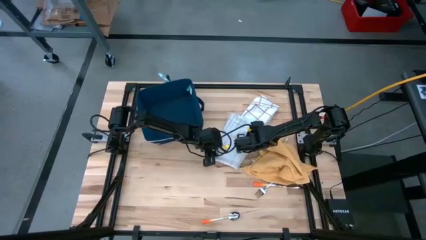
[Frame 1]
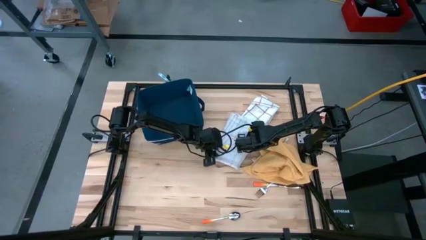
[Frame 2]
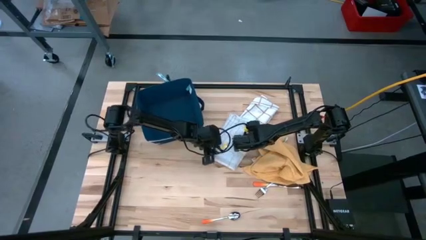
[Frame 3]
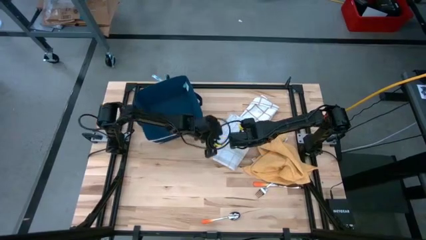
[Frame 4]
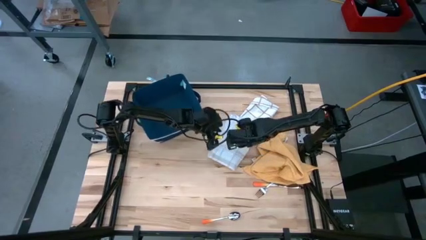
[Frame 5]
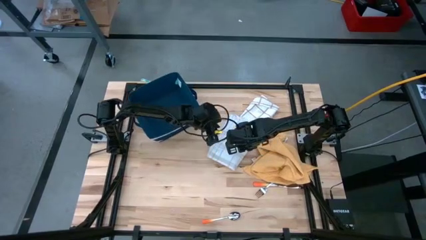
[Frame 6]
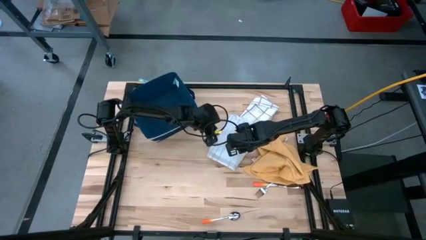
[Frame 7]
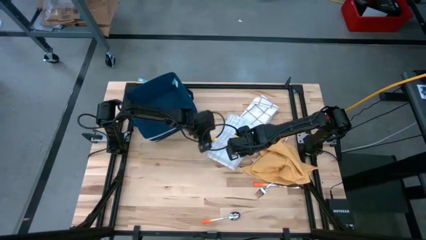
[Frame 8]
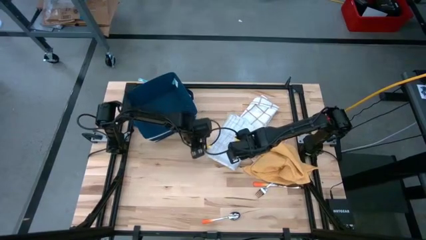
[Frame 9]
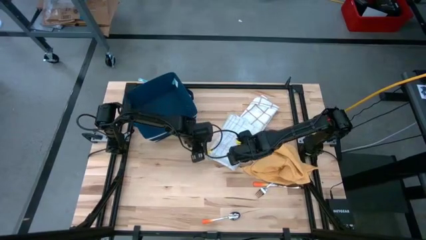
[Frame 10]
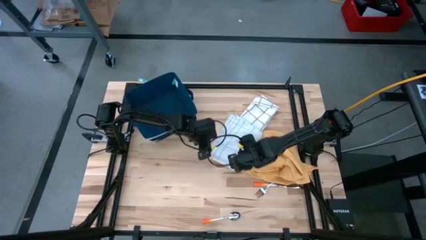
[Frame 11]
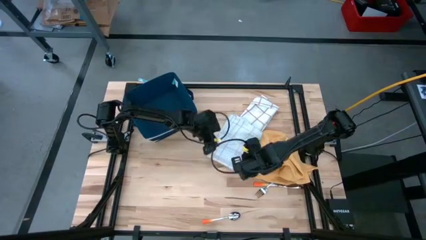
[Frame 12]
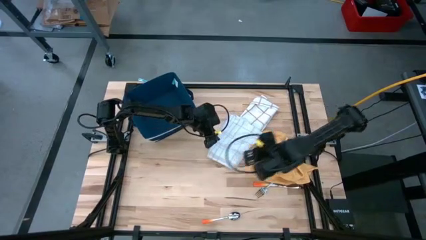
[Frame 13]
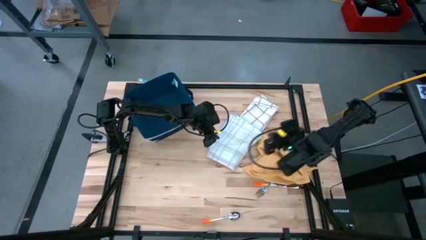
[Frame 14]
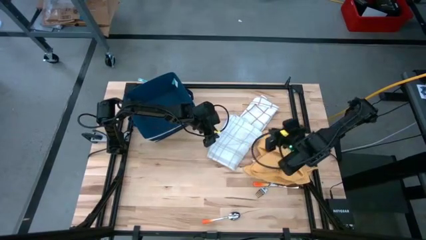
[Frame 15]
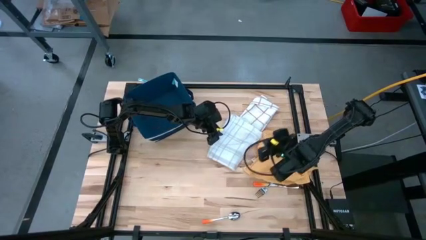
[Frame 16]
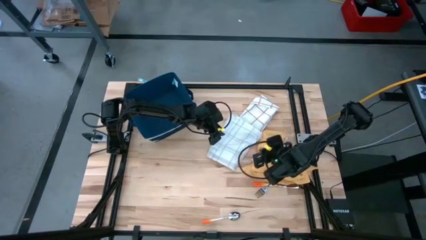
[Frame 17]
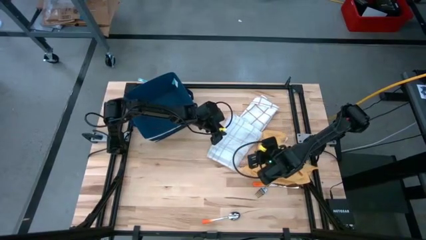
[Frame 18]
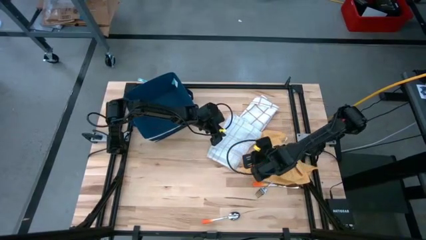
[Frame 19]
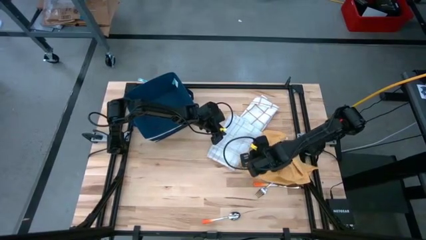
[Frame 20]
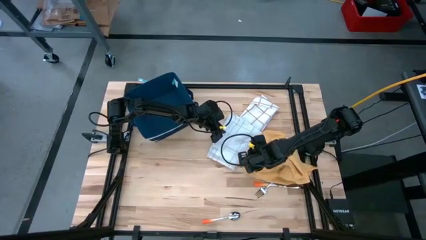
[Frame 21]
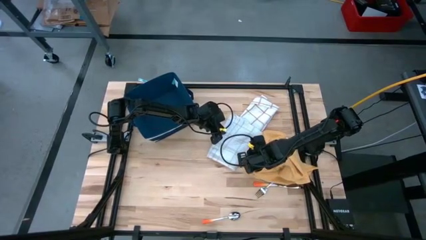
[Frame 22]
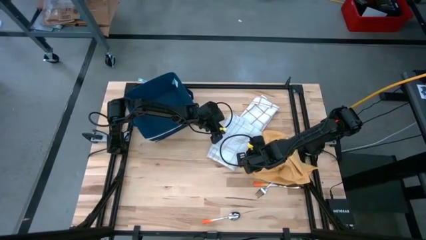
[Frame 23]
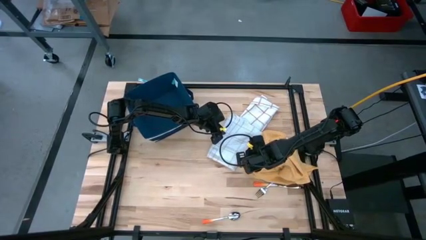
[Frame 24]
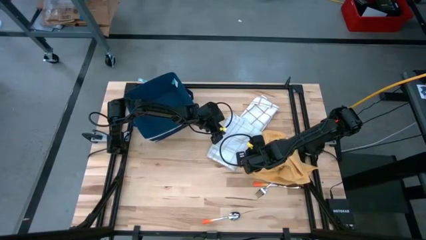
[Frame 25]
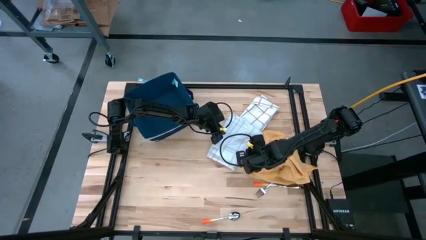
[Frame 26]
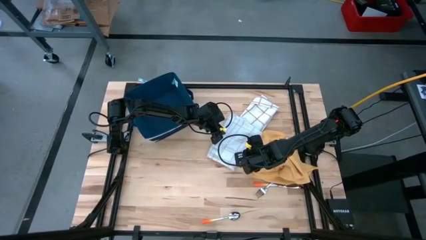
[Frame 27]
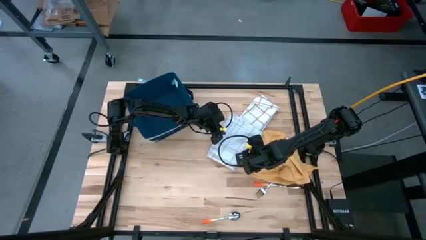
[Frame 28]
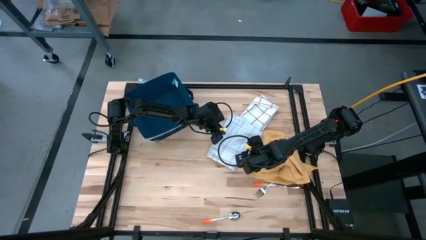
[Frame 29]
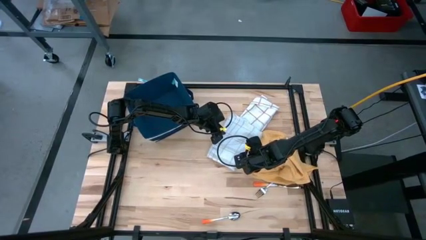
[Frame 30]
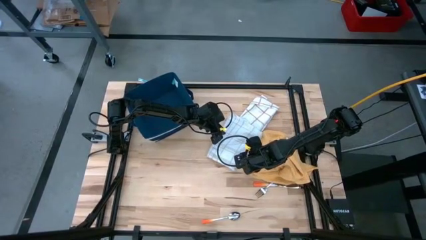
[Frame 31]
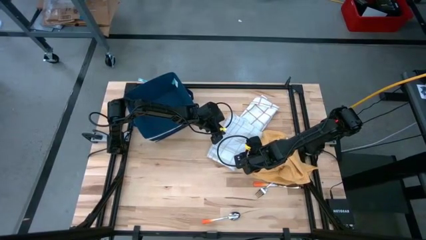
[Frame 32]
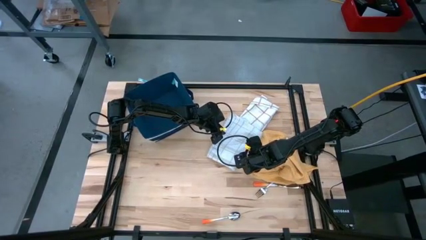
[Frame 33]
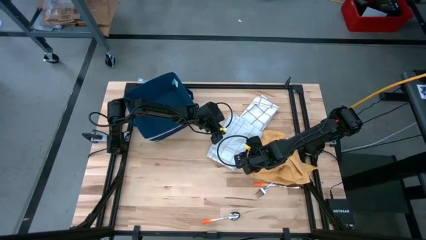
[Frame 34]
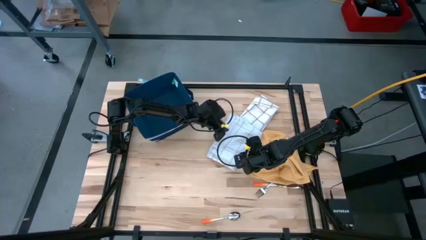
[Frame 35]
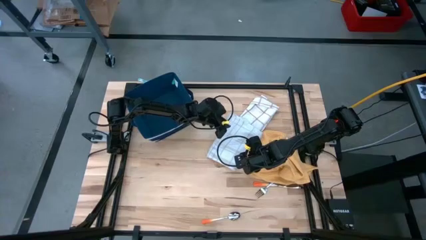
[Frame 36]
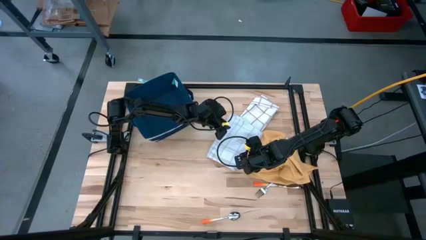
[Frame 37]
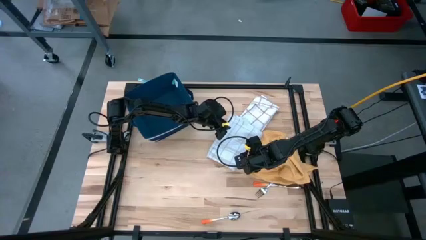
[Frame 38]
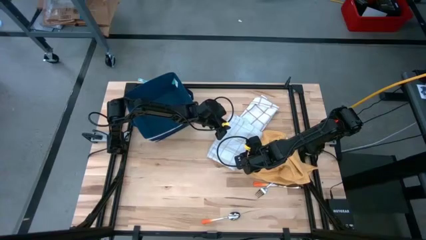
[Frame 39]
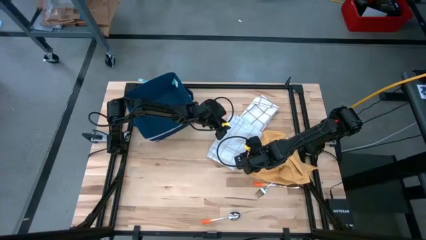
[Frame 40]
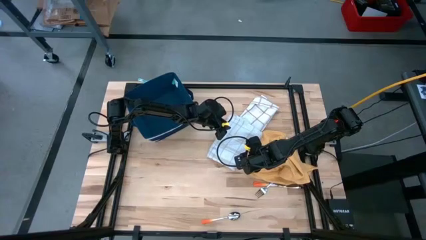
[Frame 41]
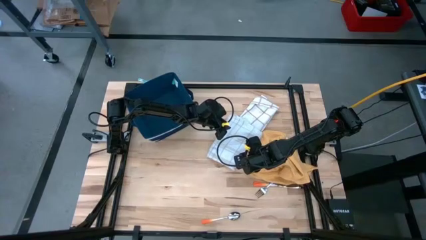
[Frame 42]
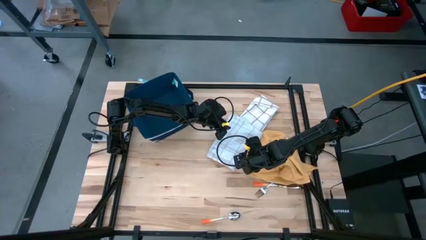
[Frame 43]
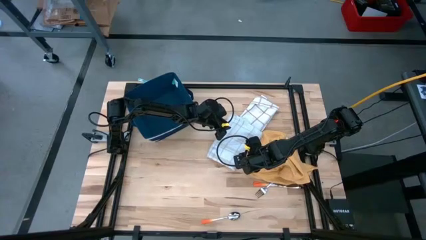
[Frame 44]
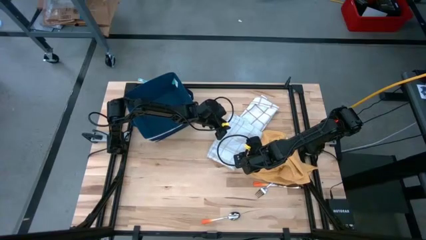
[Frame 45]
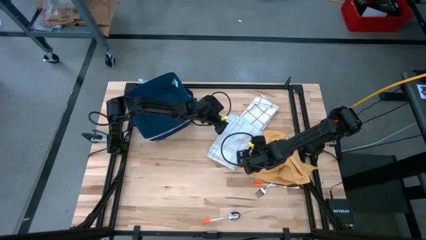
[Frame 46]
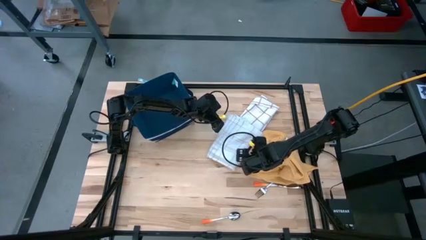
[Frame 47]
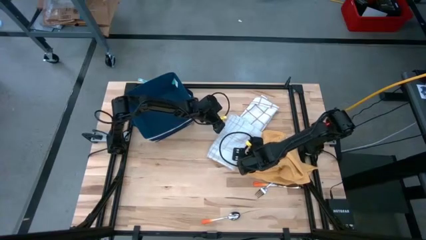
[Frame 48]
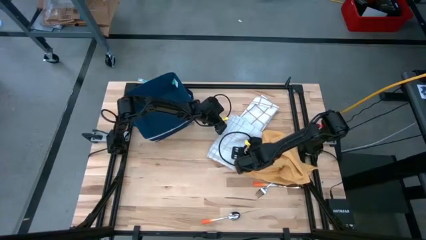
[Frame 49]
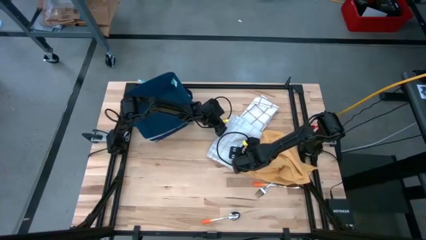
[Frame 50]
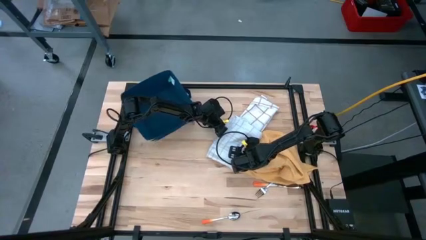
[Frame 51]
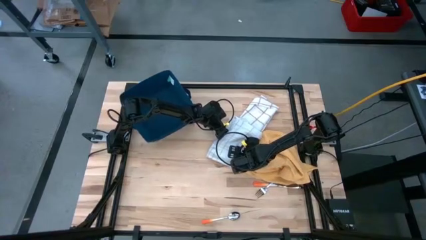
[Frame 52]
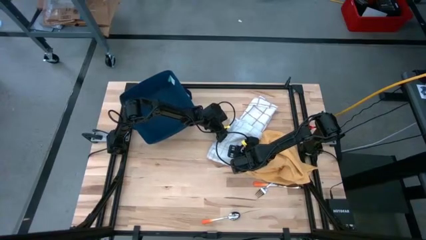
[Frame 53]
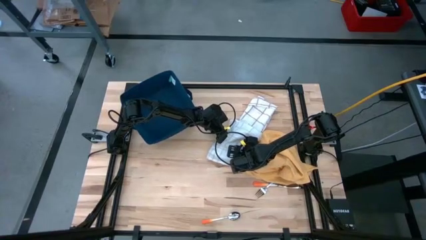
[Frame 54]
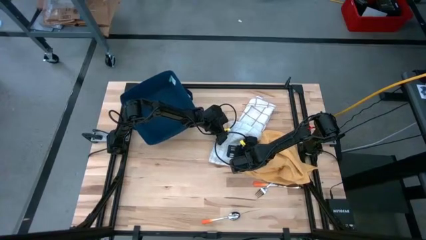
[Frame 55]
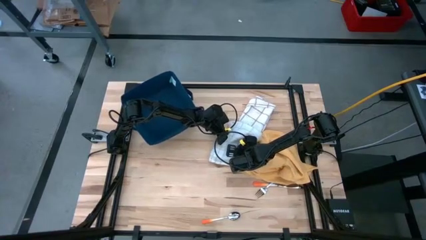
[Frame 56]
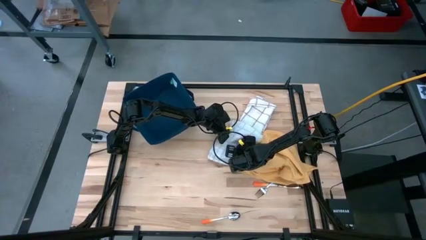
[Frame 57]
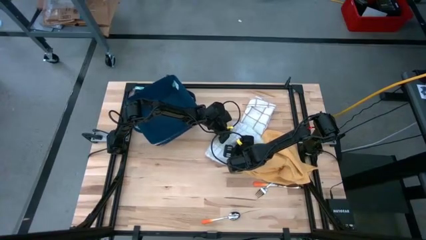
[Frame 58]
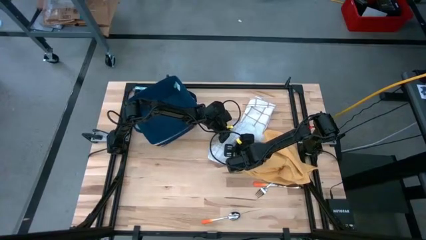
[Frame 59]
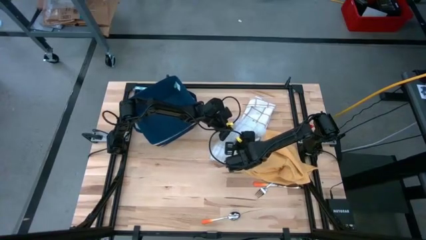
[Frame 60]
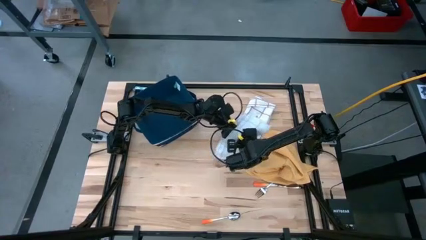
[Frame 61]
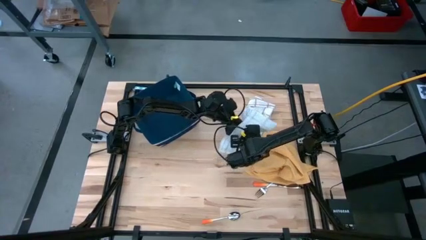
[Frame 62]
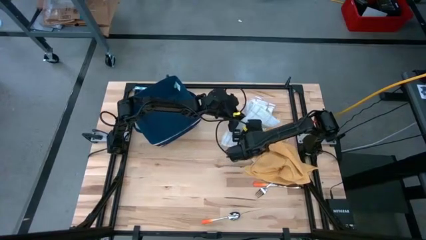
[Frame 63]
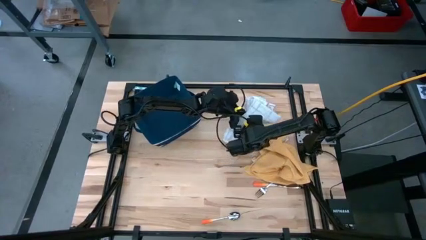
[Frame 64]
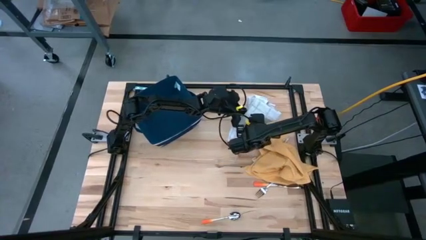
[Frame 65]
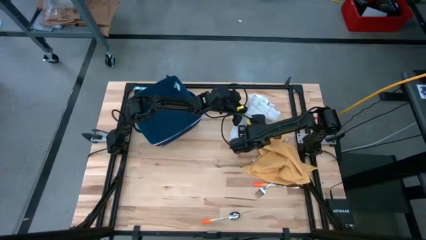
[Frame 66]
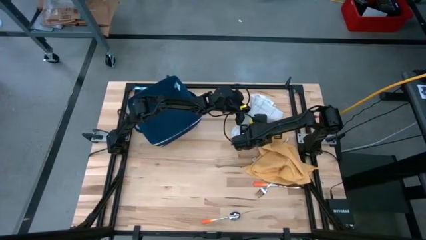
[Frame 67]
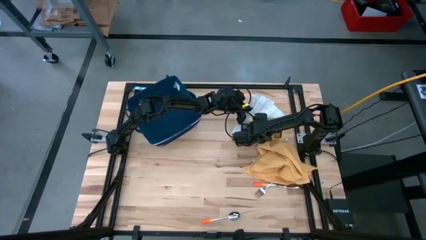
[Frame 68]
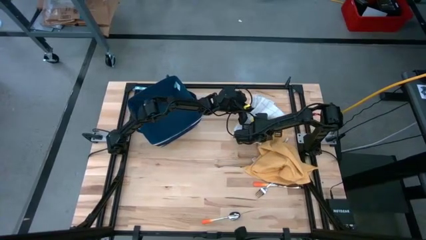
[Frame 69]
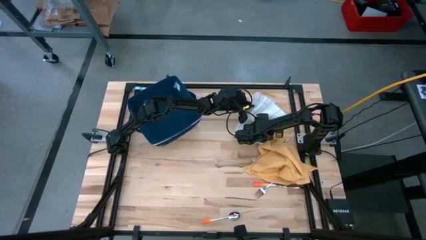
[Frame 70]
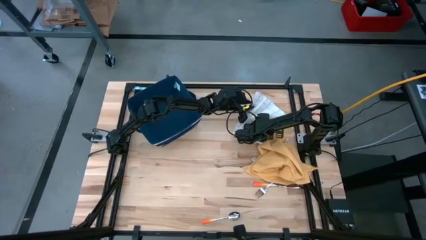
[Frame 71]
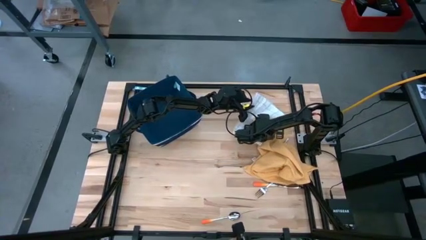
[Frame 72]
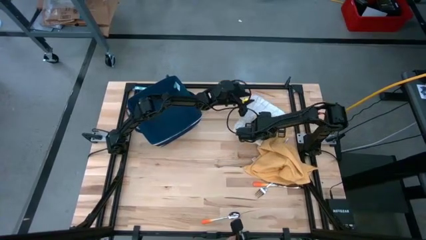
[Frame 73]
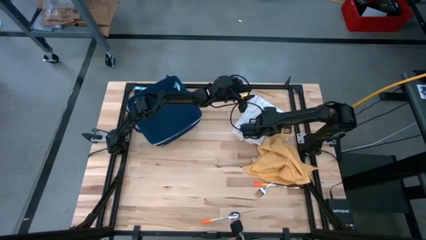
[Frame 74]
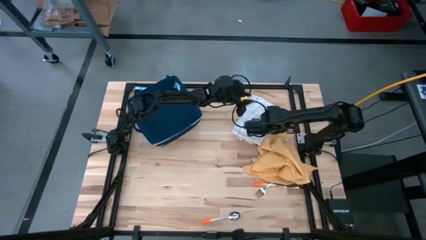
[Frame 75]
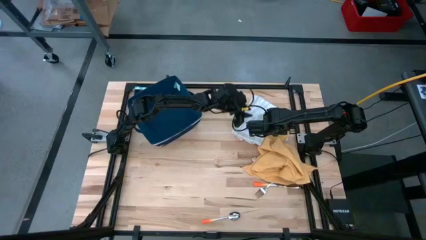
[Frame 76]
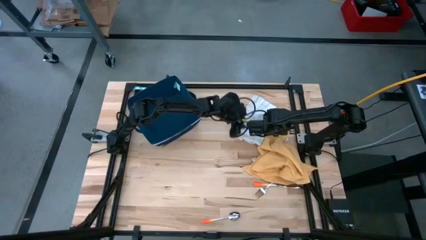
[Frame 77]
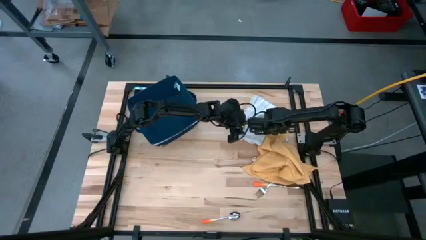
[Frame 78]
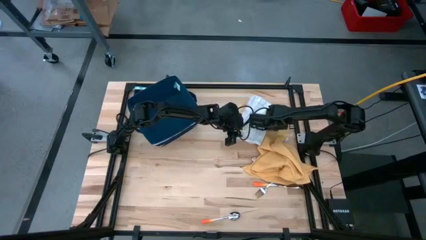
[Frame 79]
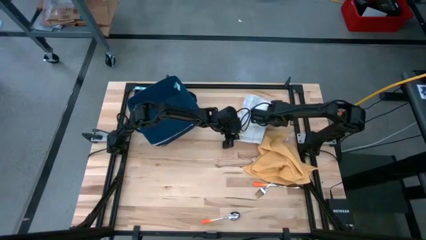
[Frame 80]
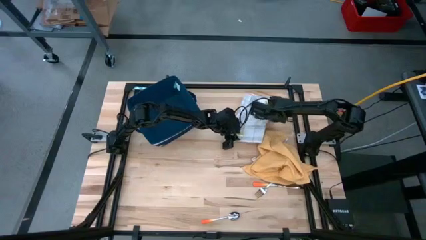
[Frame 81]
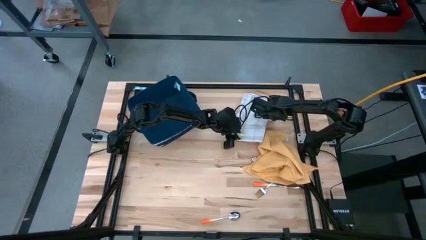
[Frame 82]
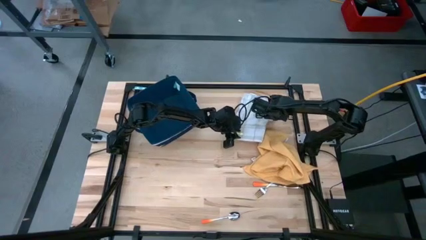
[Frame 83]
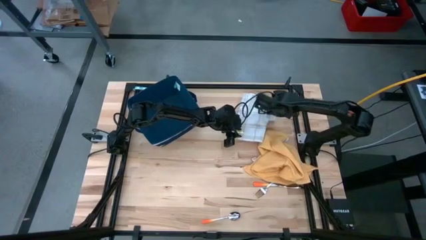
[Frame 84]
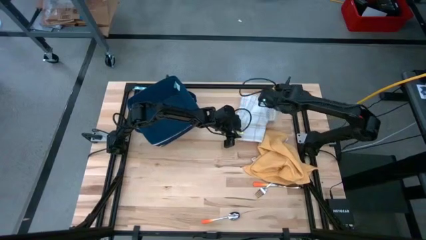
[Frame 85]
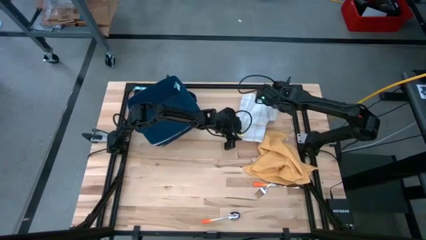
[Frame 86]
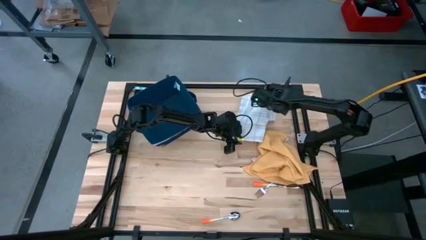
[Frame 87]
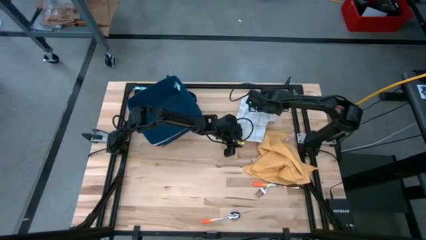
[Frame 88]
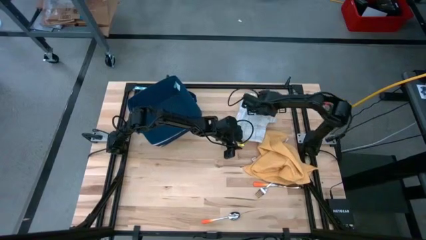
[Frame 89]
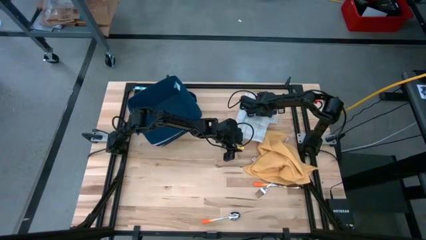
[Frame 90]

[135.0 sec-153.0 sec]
Task: Fold towel
Stack the left white patterned towel on the right white patterned towel
